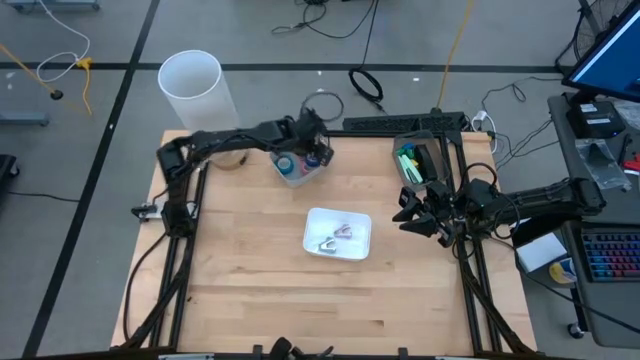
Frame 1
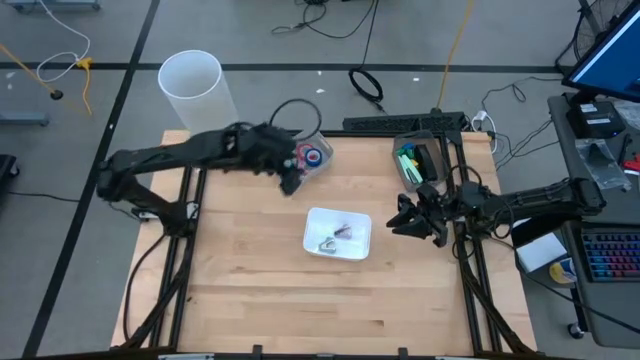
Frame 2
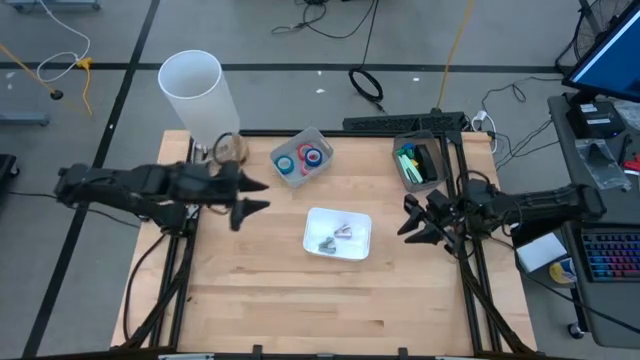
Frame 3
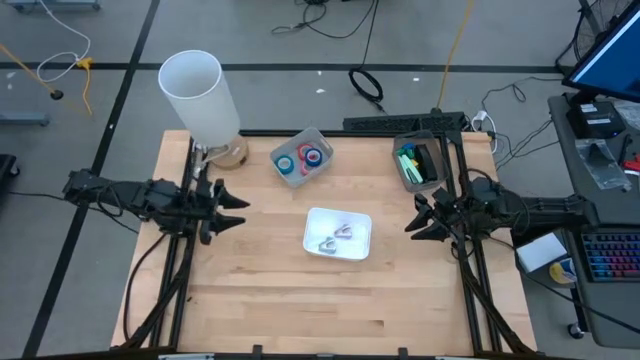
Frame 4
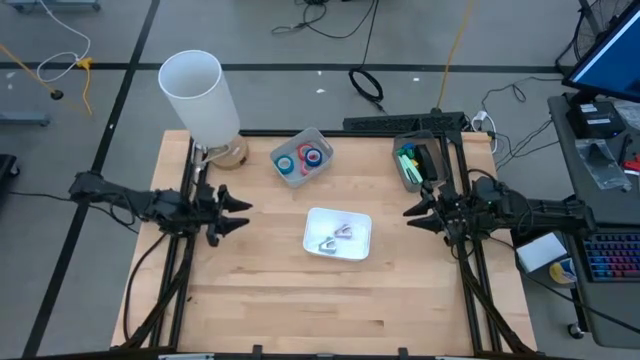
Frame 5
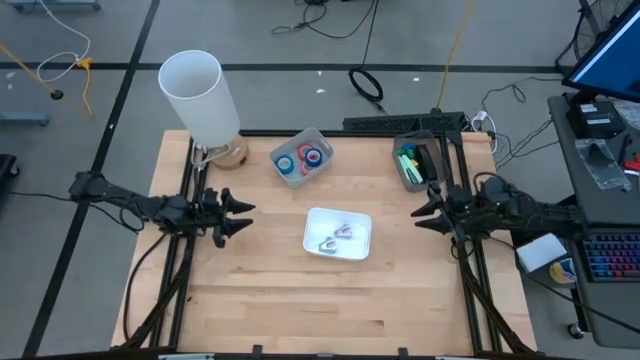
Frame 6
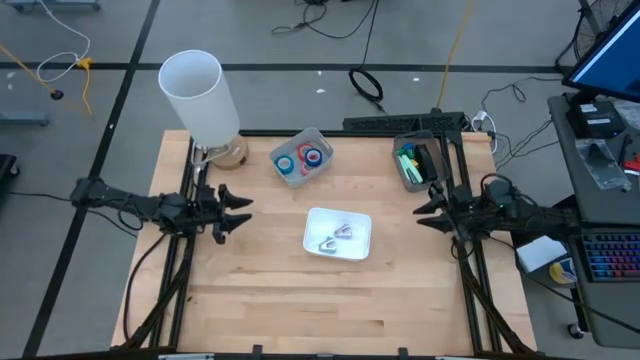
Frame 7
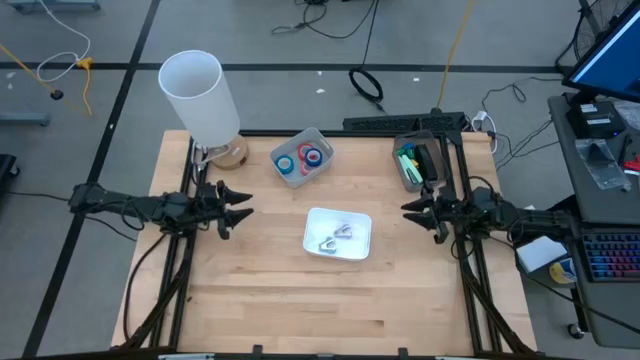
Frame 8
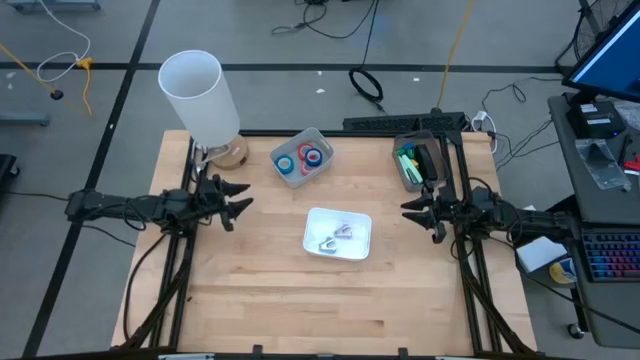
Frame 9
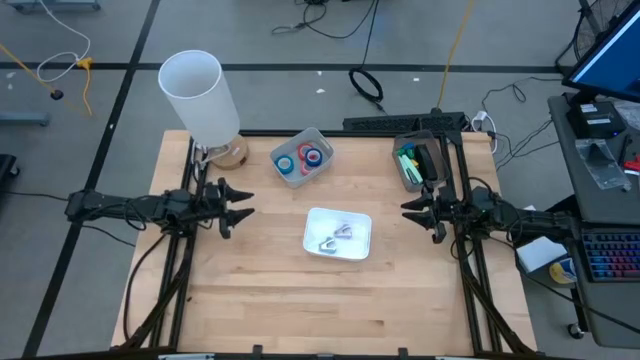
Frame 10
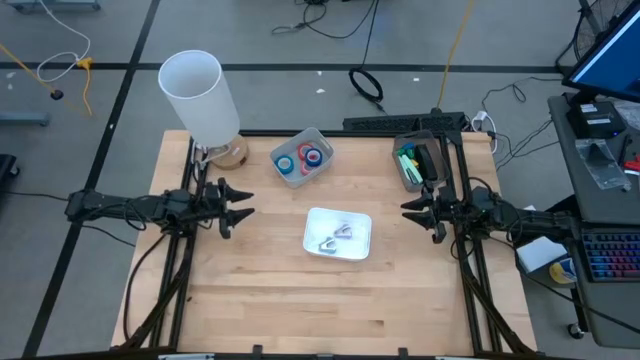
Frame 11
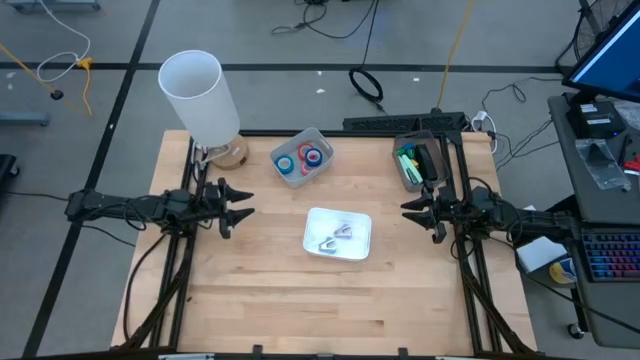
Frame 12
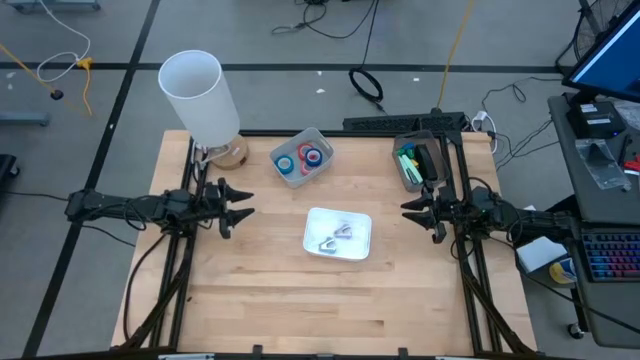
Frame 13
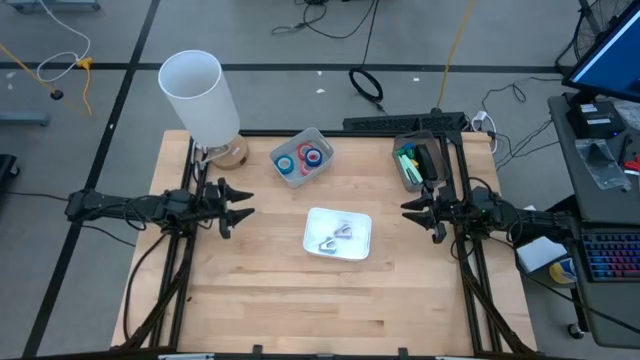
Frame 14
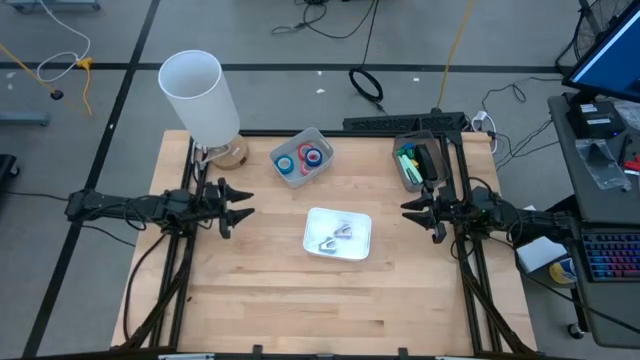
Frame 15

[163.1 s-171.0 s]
Task: Pick and place Stapler, Stapler remover, tape
Return to Home Position

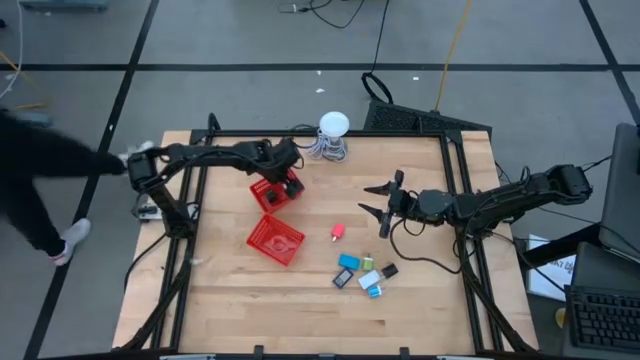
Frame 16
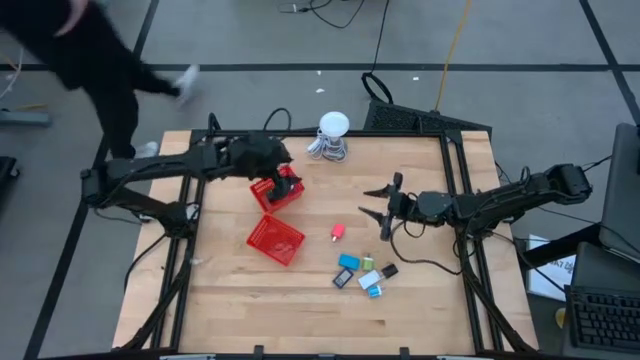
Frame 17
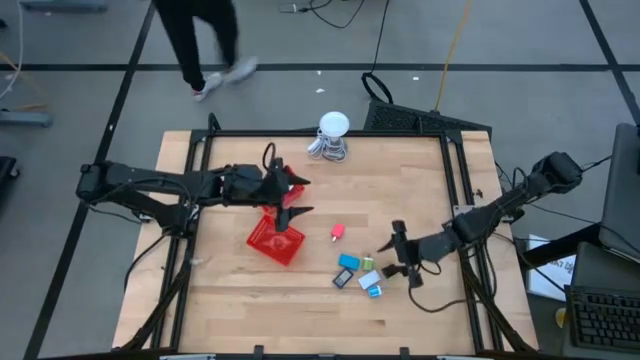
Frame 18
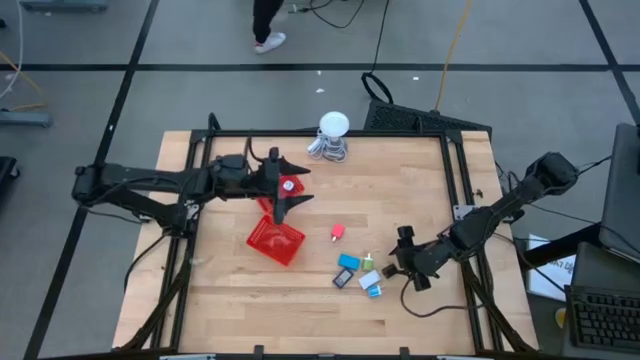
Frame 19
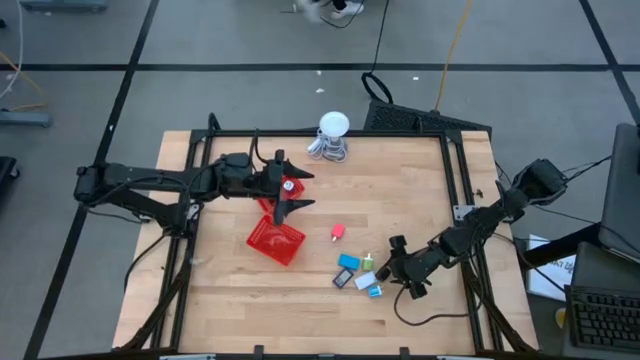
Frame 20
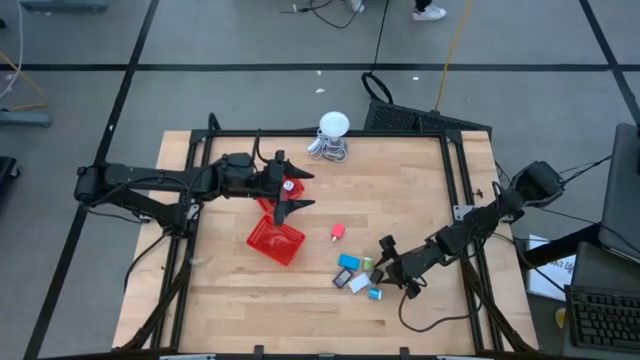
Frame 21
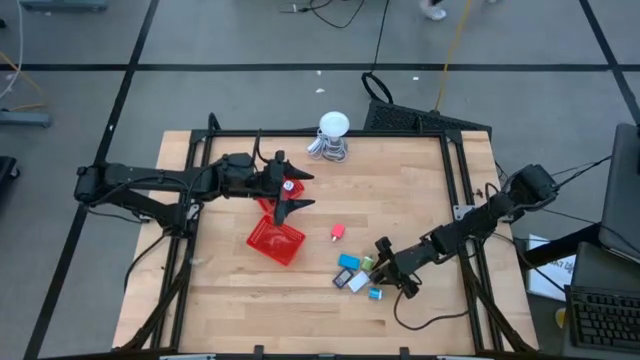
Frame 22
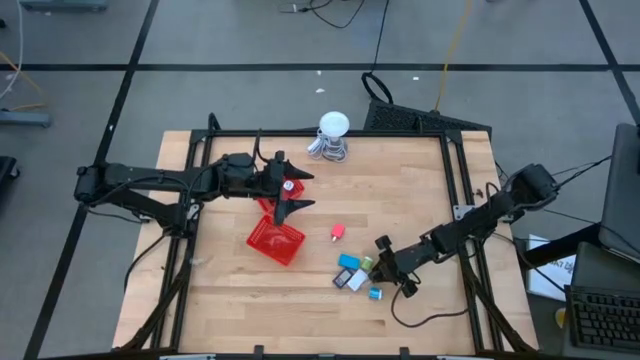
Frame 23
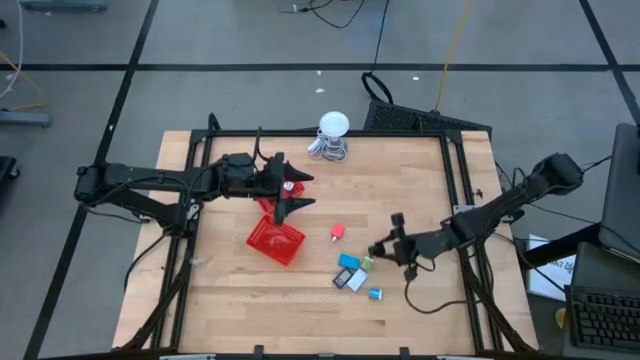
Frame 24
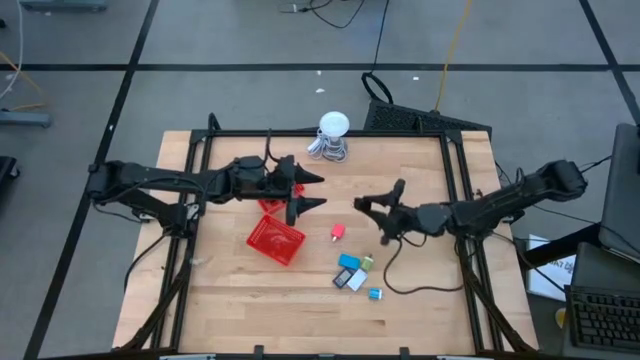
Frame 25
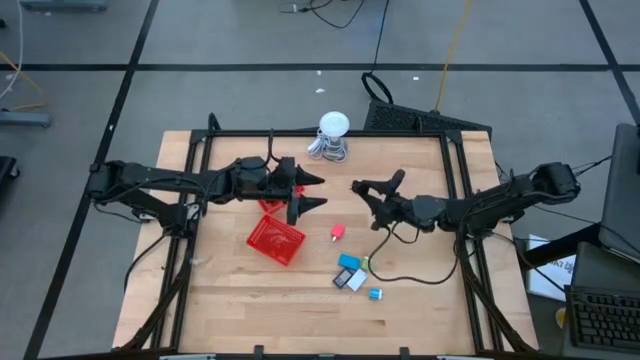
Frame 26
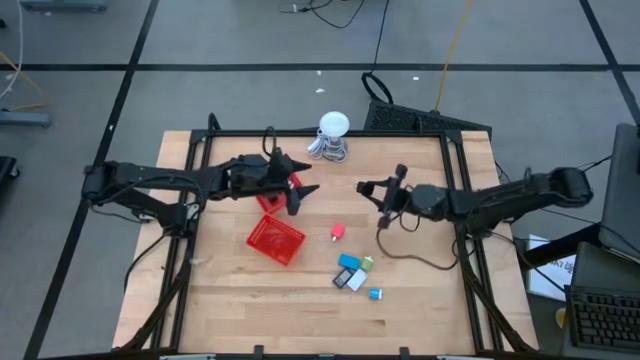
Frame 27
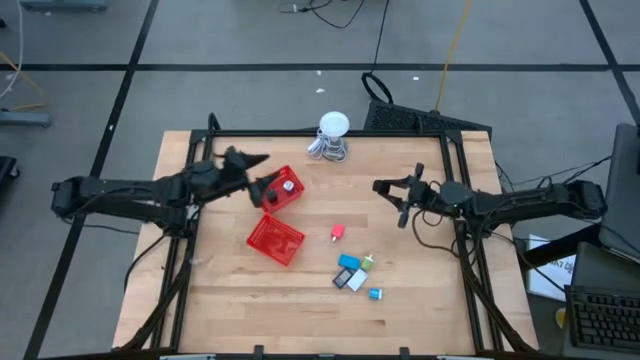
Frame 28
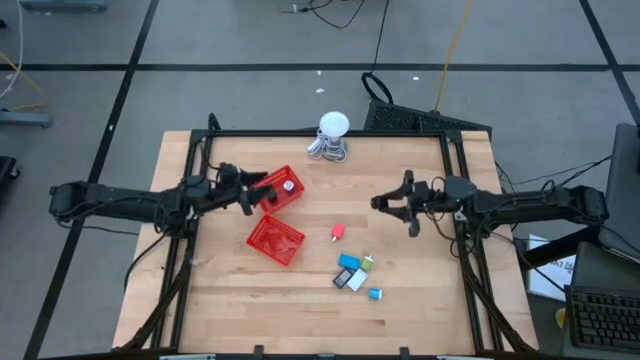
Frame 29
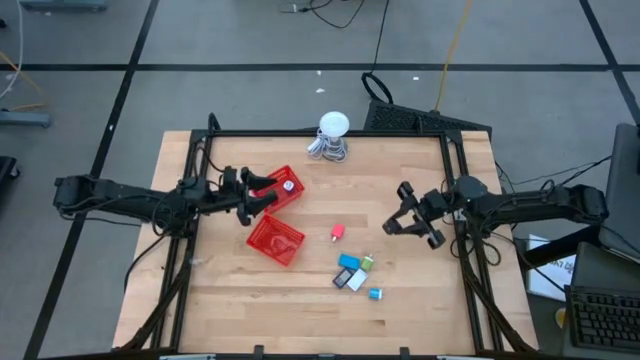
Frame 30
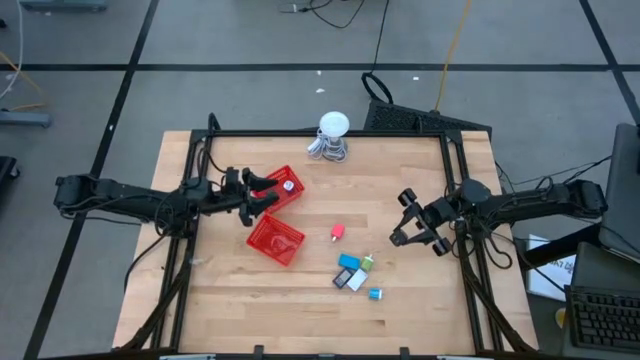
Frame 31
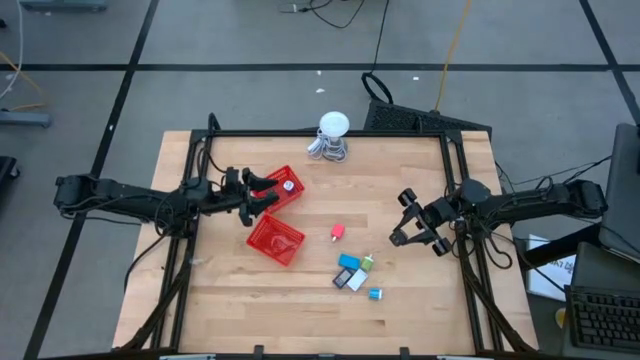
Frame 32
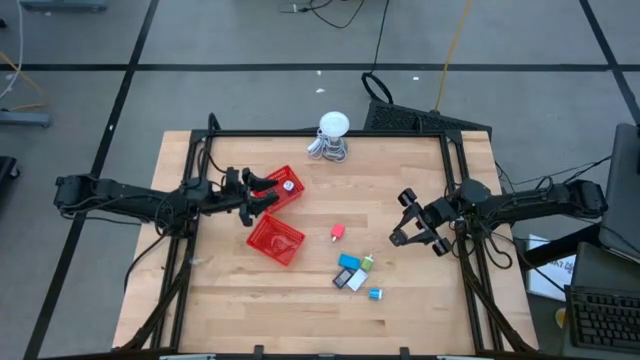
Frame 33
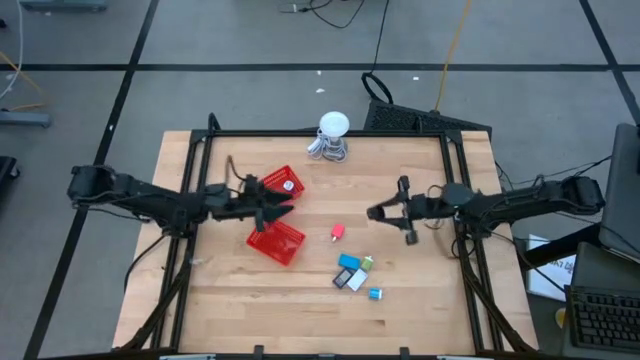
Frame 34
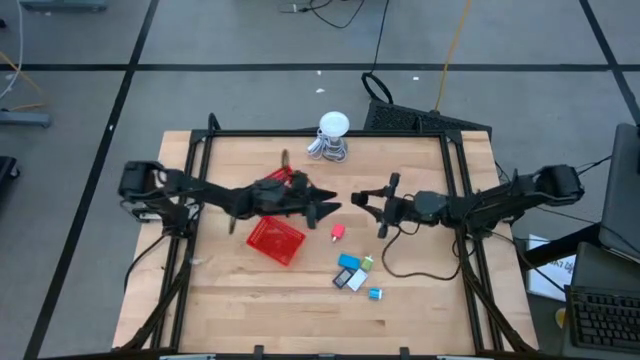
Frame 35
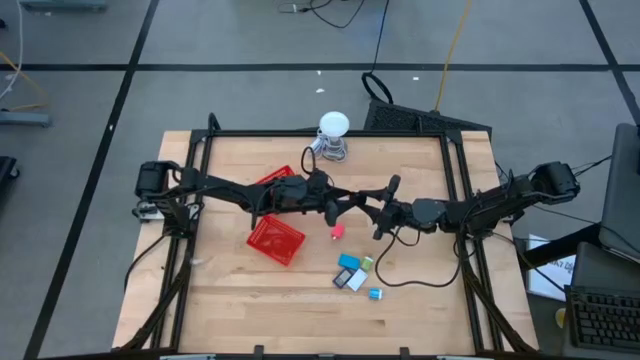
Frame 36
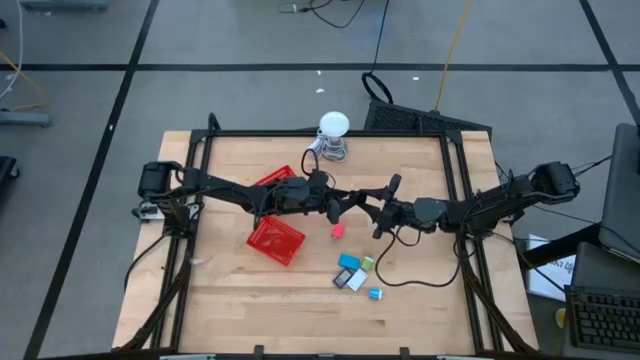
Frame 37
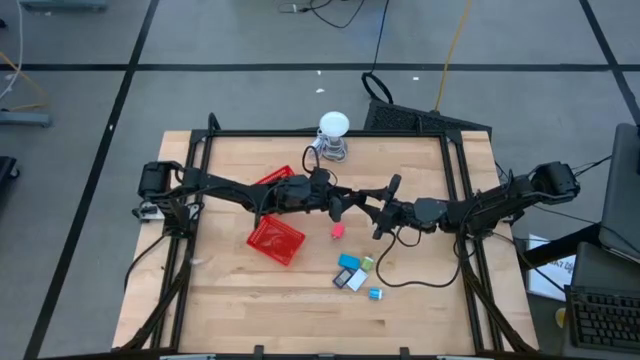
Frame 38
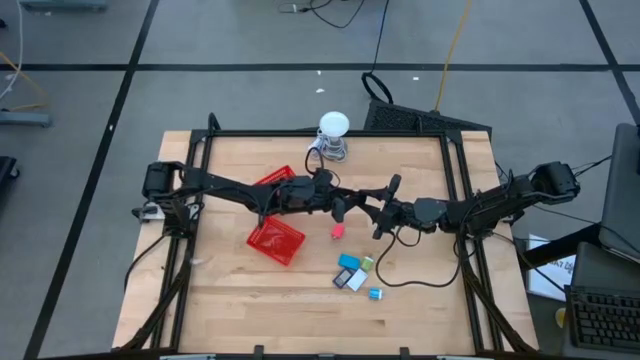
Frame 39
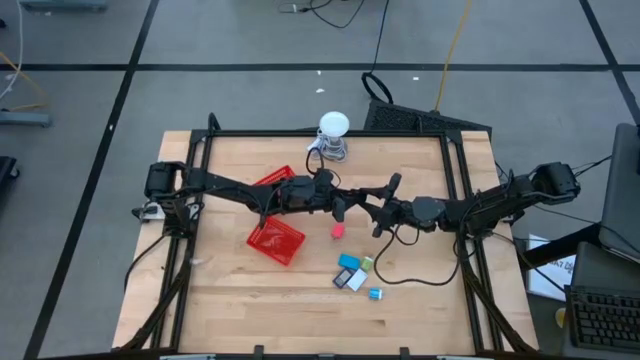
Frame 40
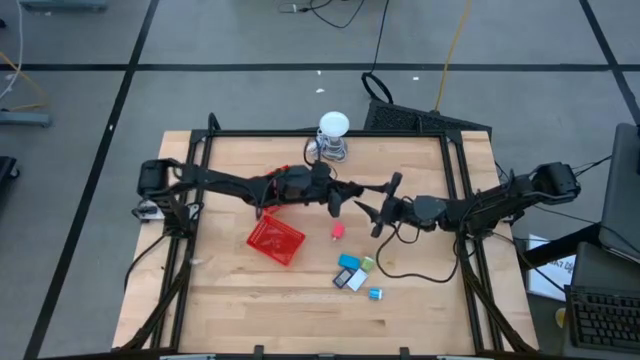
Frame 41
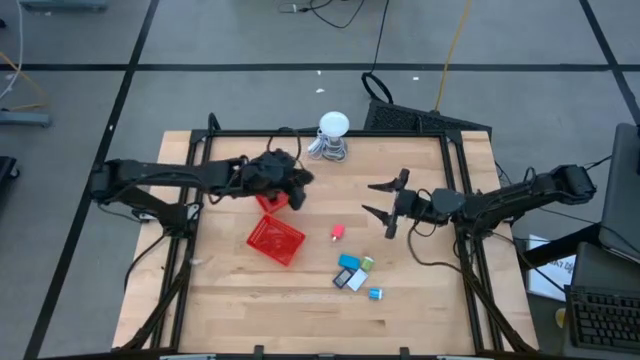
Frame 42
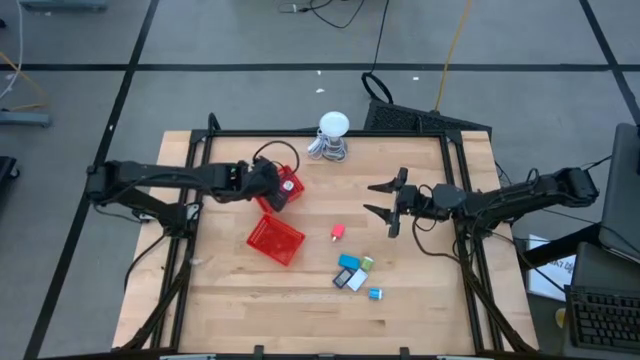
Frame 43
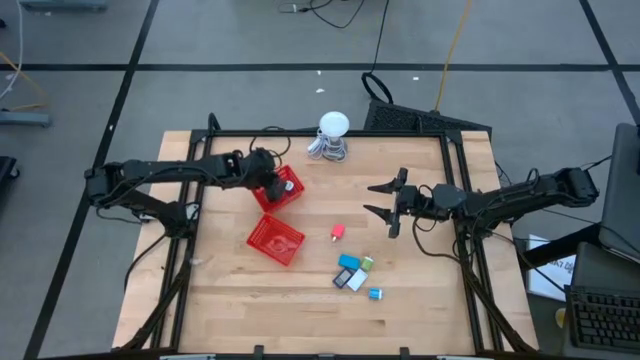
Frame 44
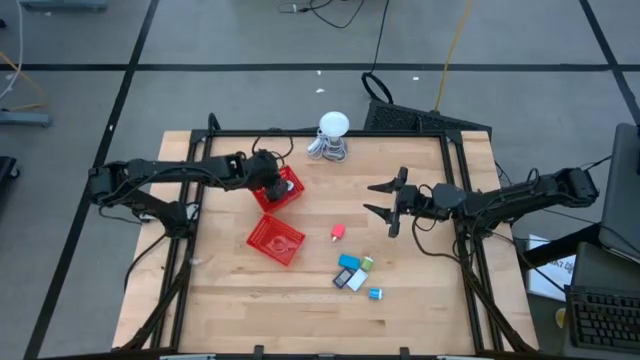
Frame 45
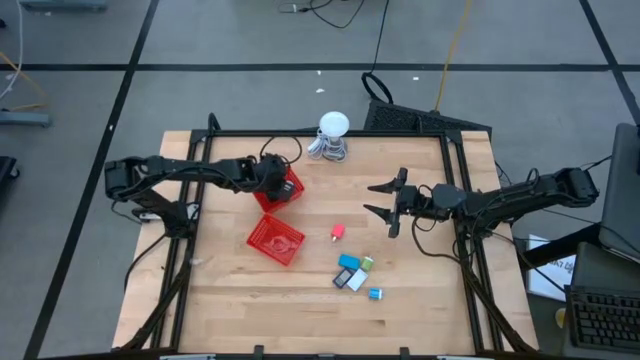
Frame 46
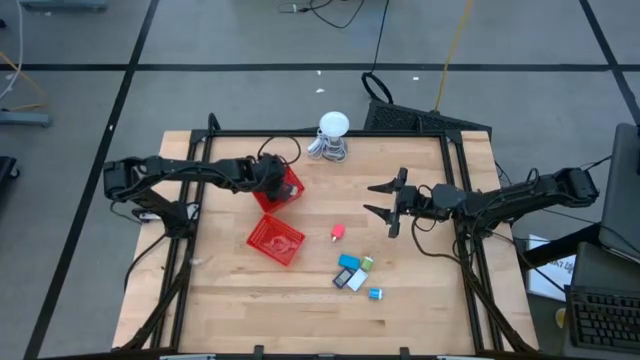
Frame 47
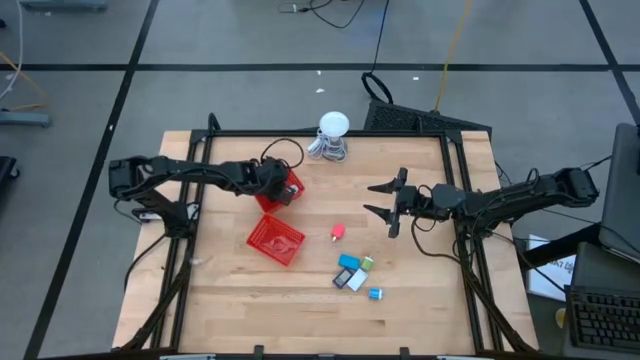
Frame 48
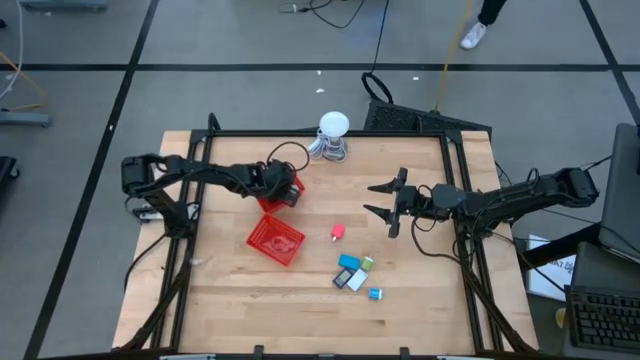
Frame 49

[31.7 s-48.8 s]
Task: Pick & Place Office items
Put the black charger adapter into the top red basket
